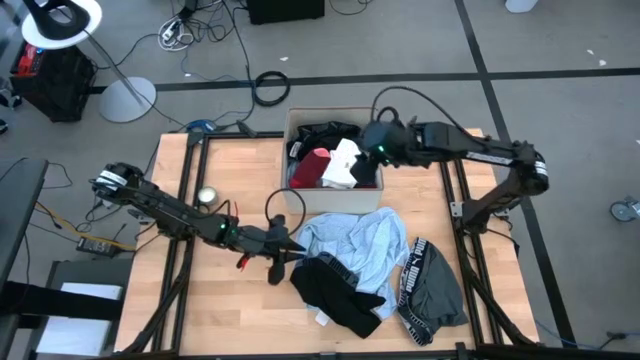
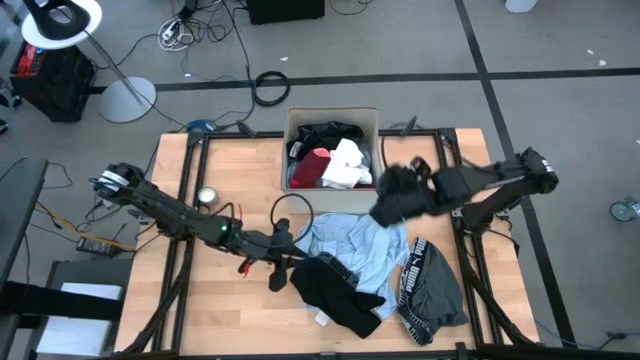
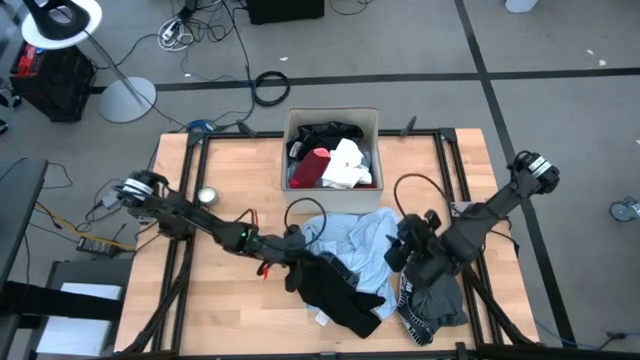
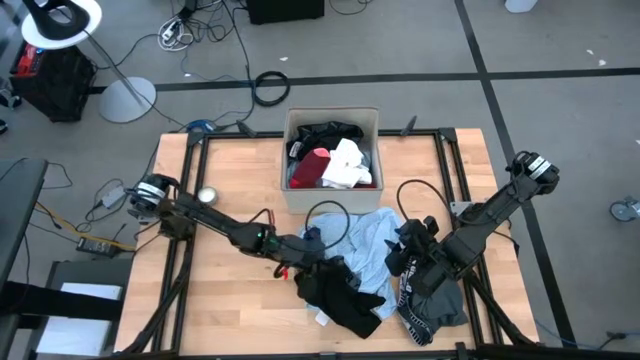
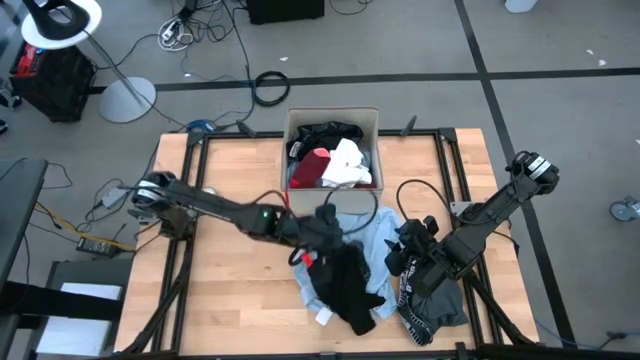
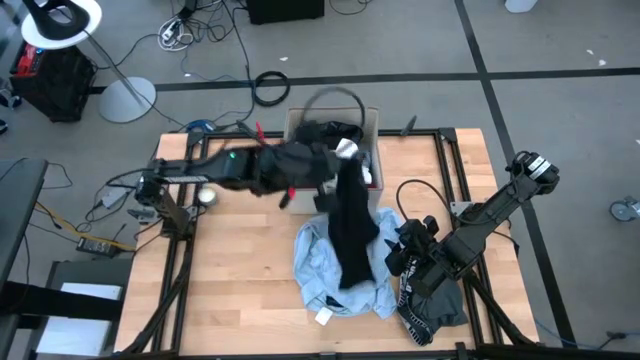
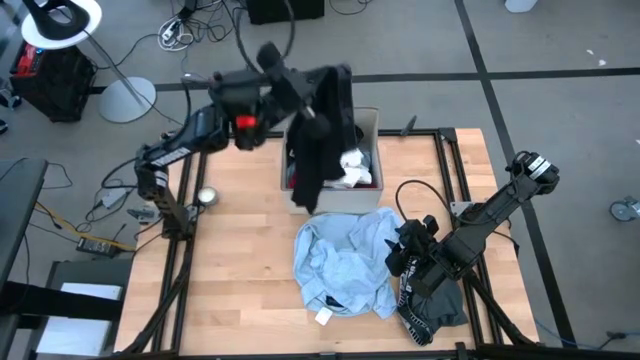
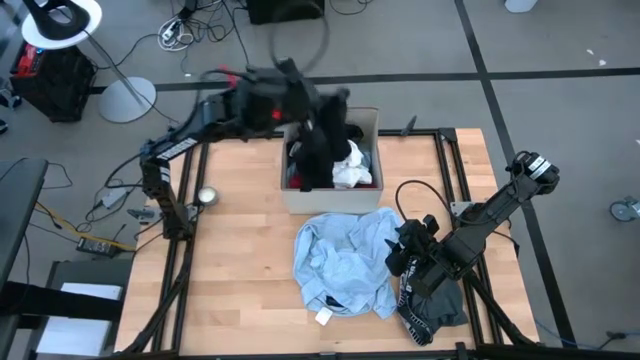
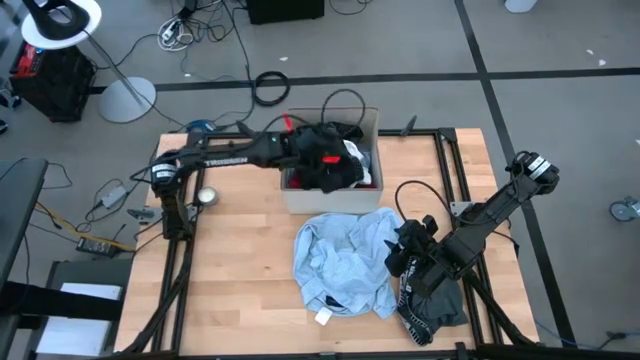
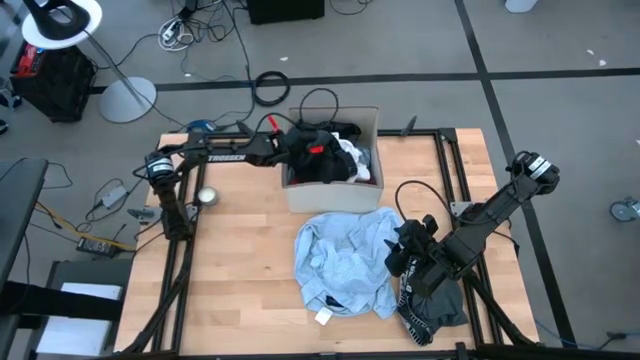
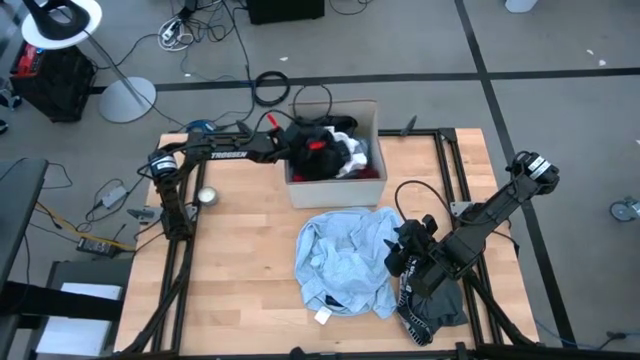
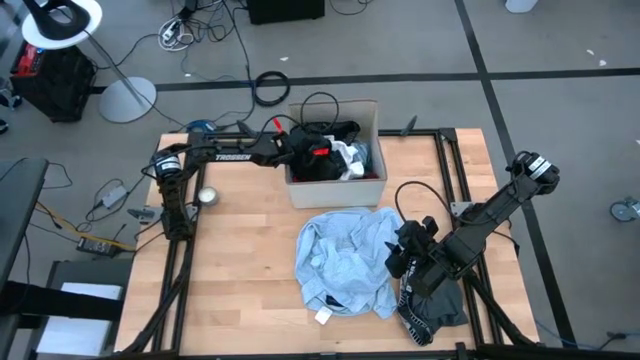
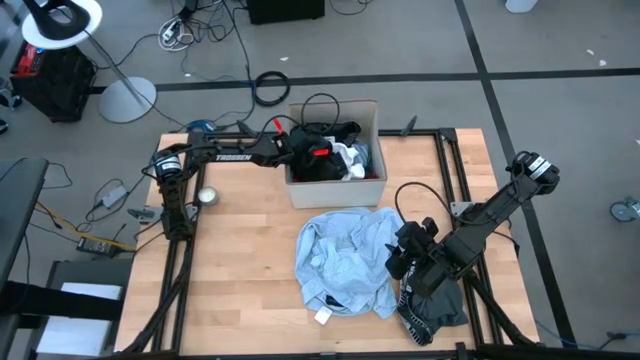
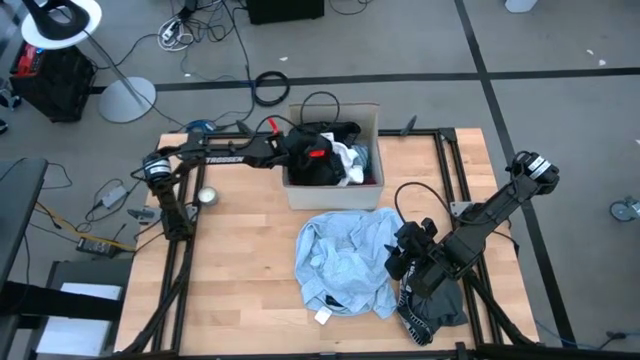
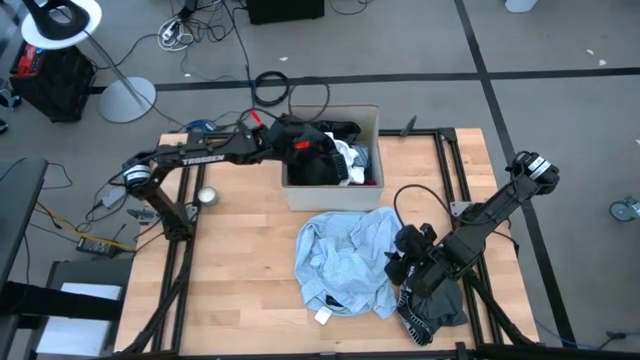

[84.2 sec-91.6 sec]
Task: Sort clothes
Put the black underwear into the white laundry bin

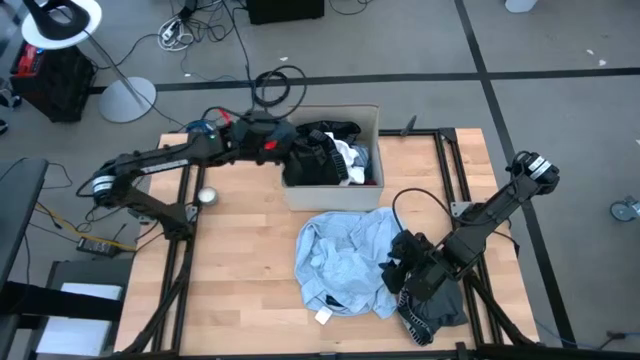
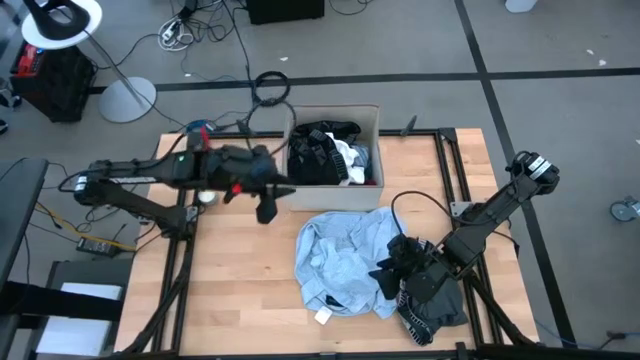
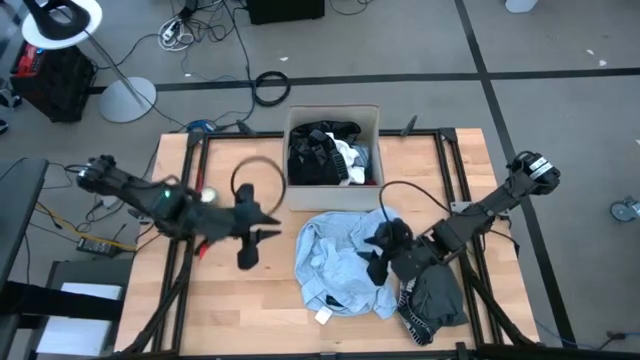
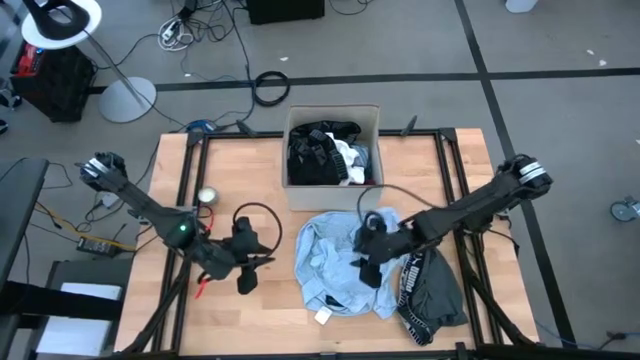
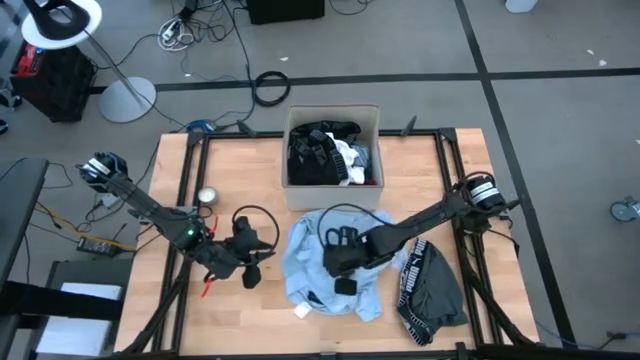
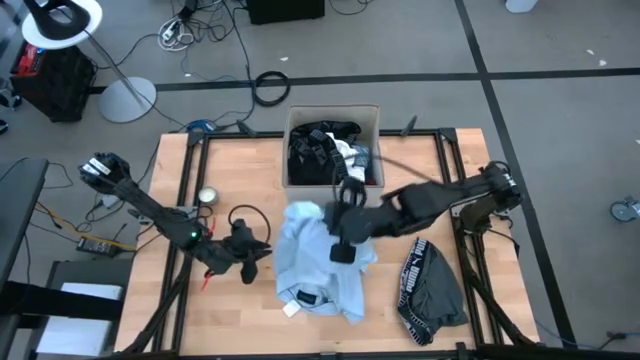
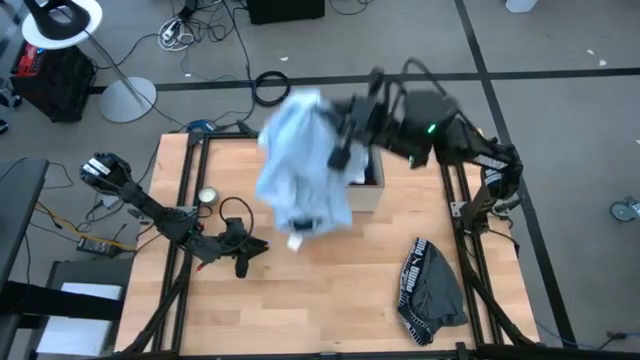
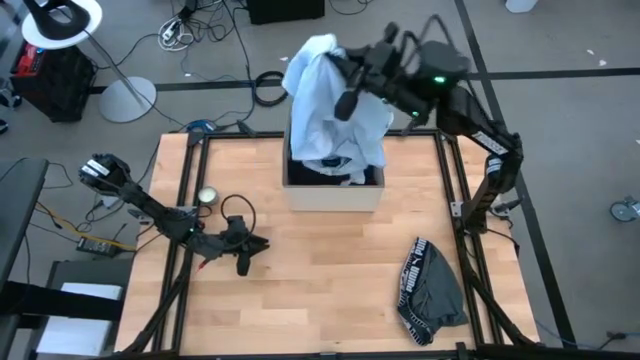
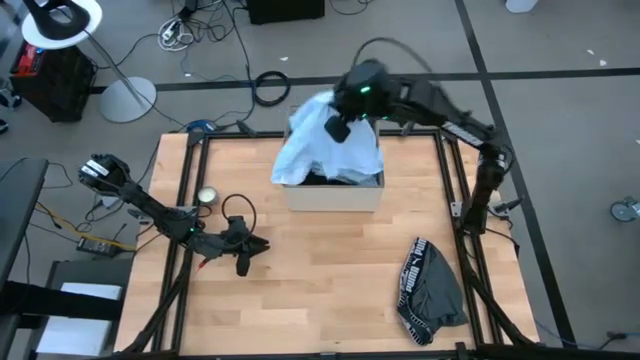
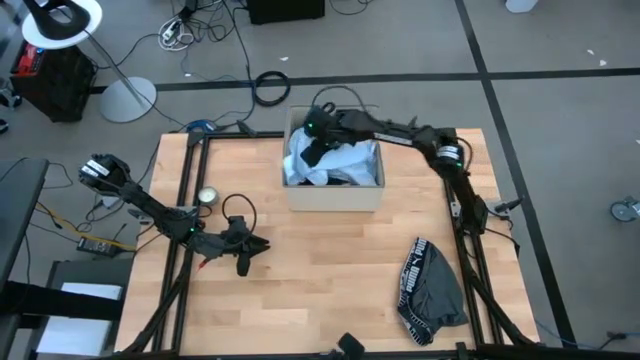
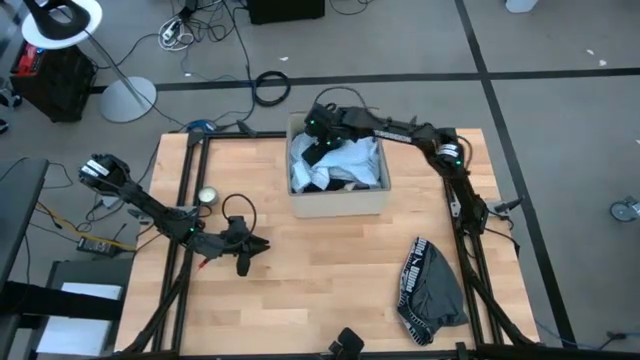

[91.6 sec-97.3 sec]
Put the blue patterned polo into the white laundry bin

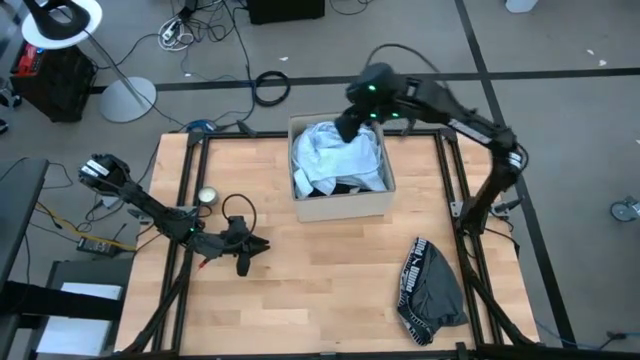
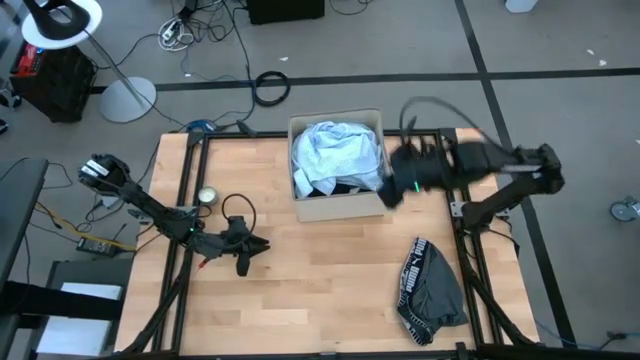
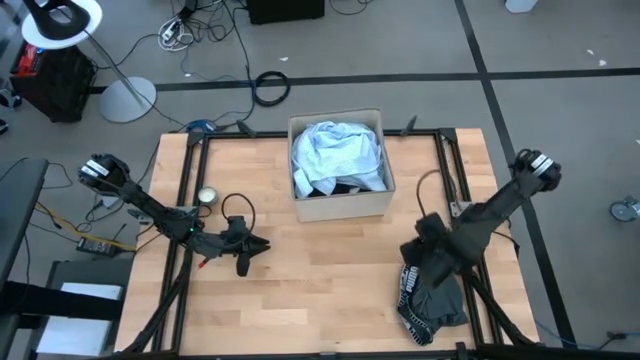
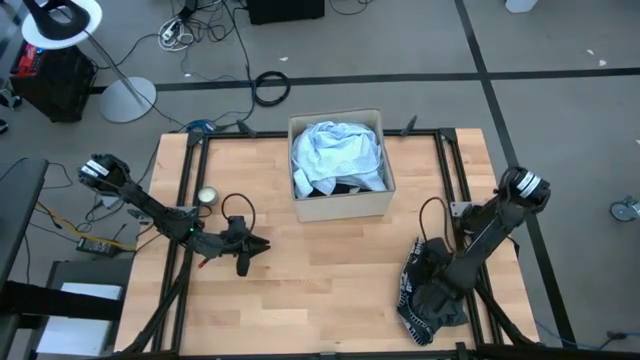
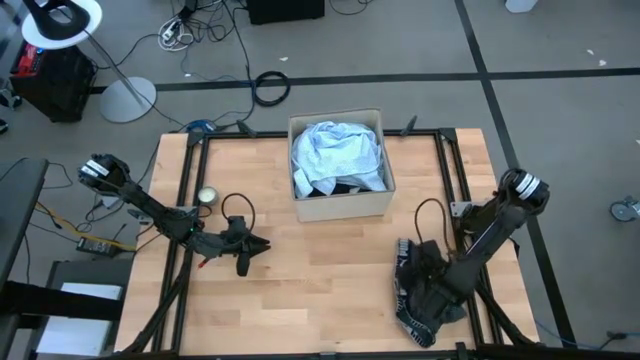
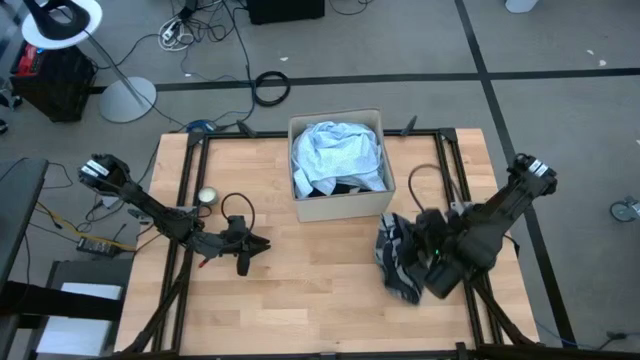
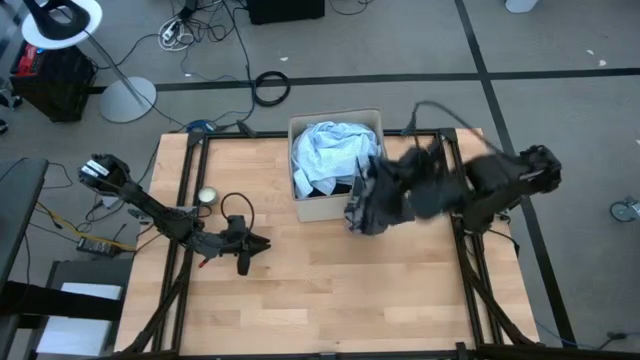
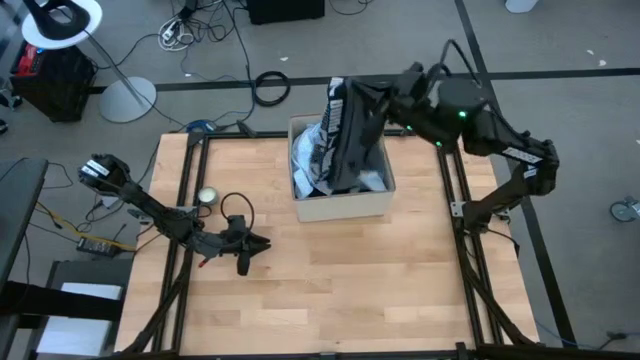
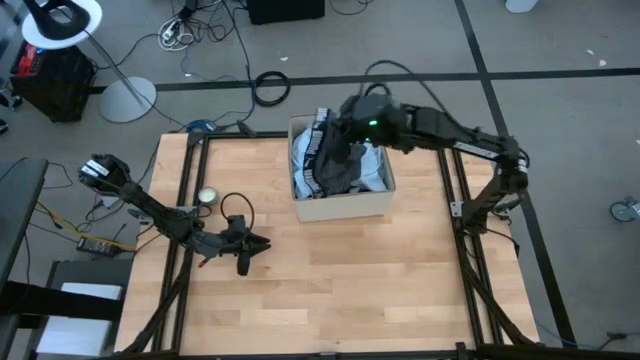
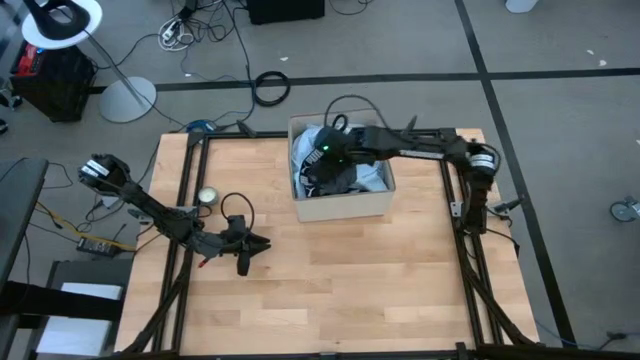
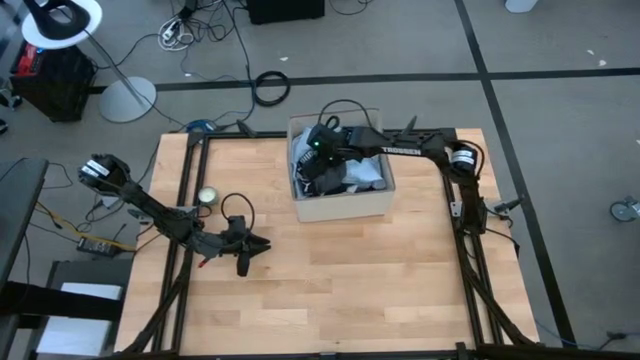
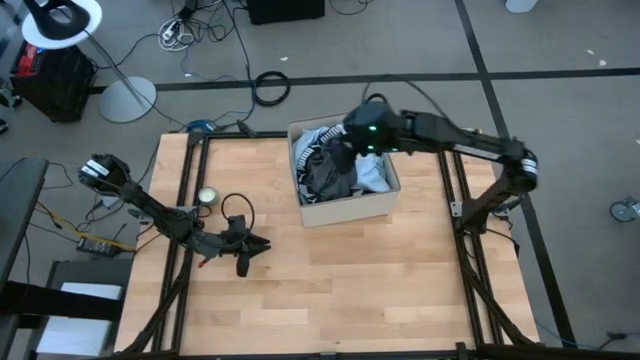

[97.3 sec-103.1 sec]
Put the gray underwear into the white laundry bin

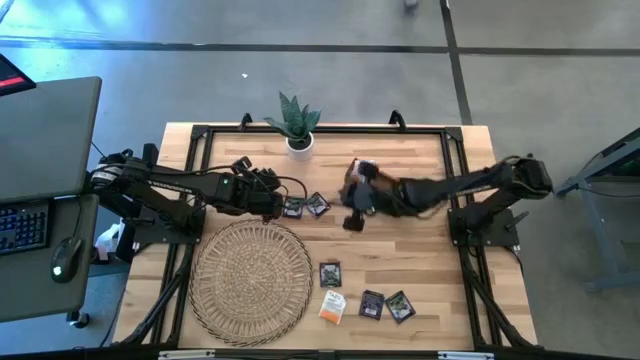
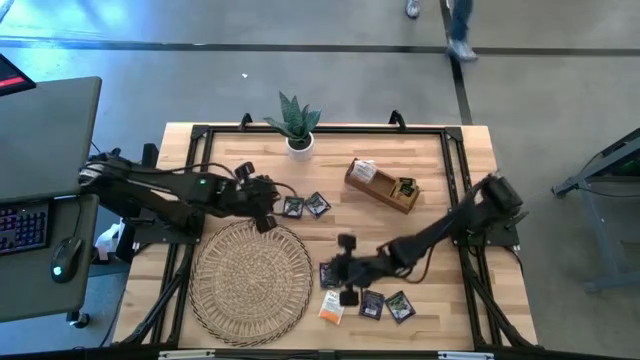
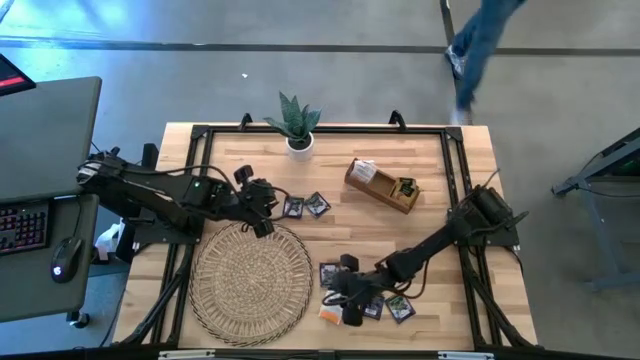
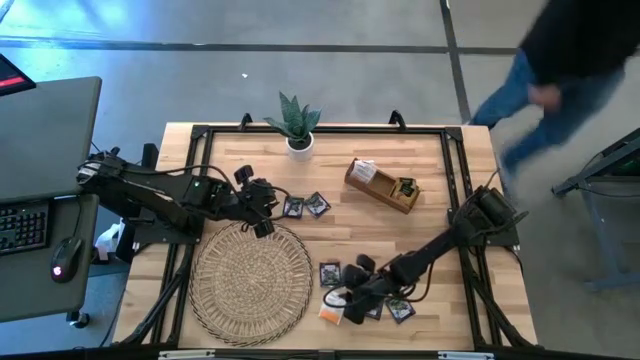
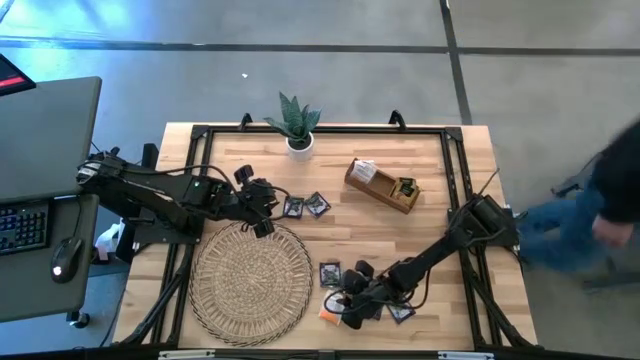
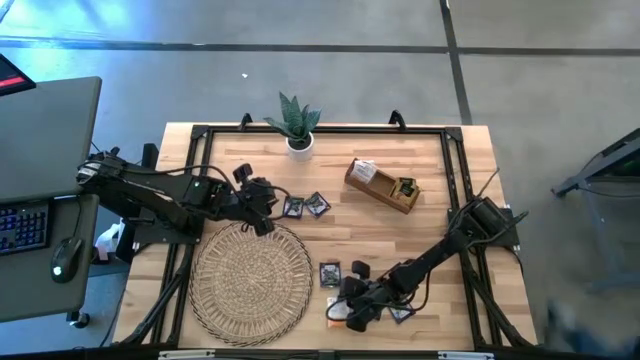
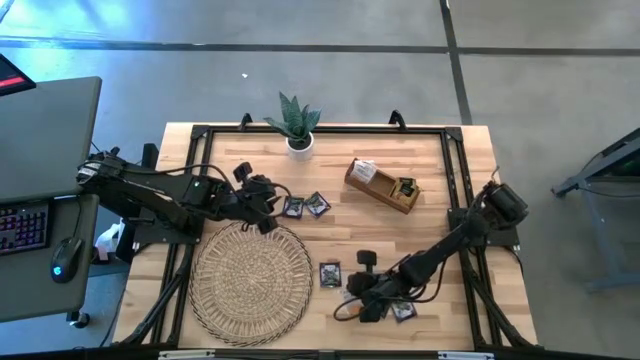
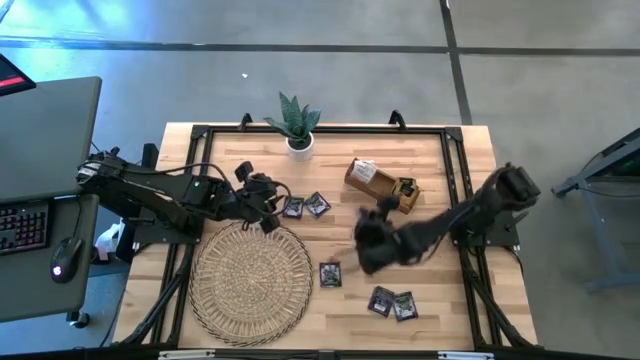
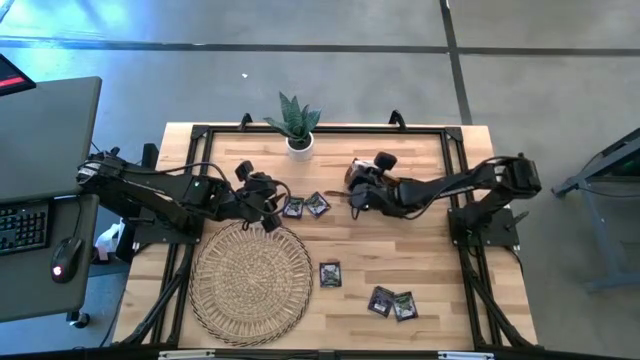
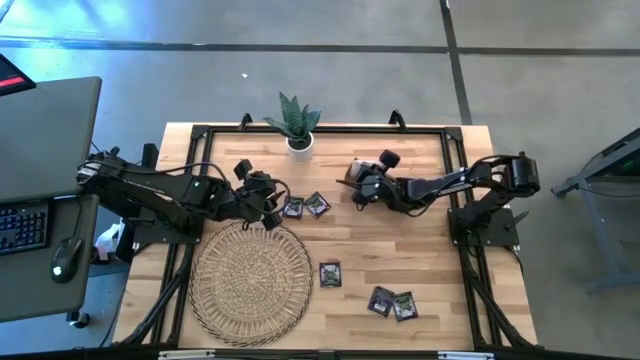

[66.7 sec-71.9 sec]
Task: Pick & Place Tea
Put the white tea bag into the left section of the wooden organizer
